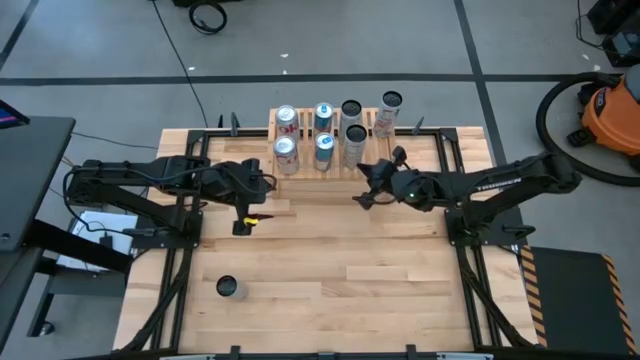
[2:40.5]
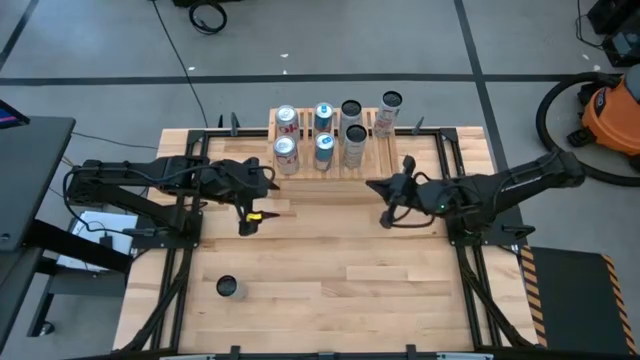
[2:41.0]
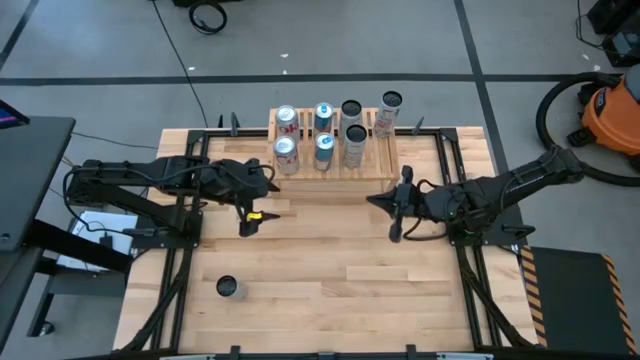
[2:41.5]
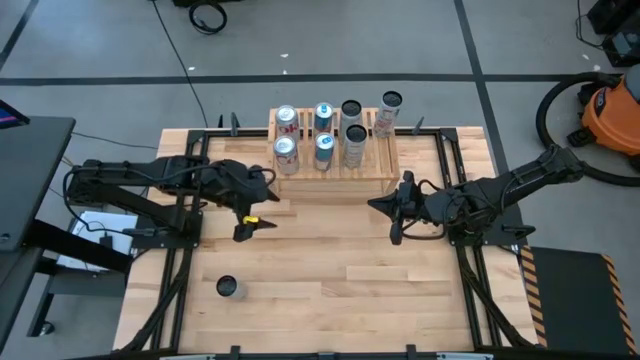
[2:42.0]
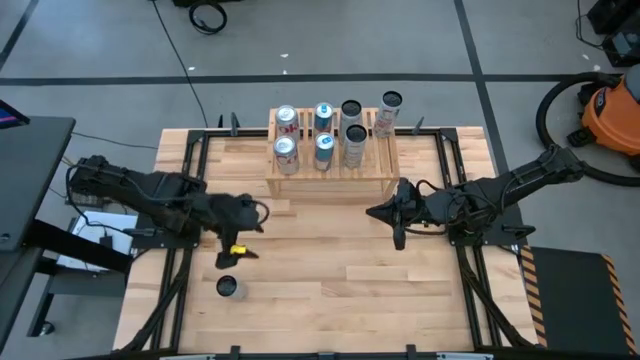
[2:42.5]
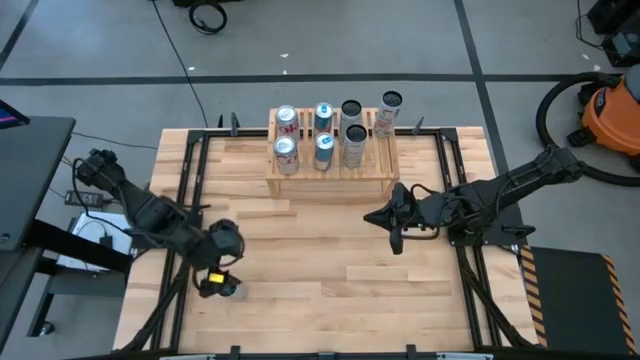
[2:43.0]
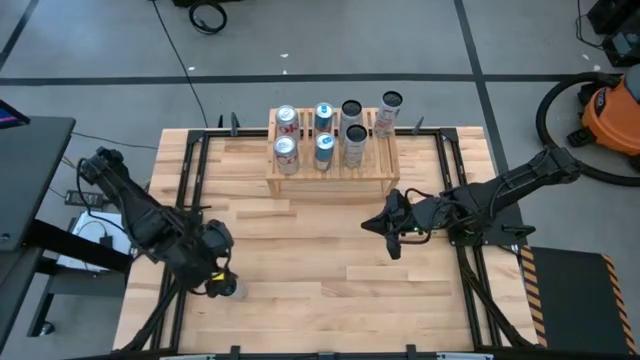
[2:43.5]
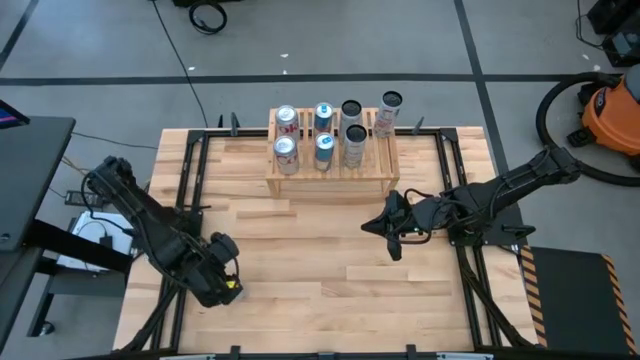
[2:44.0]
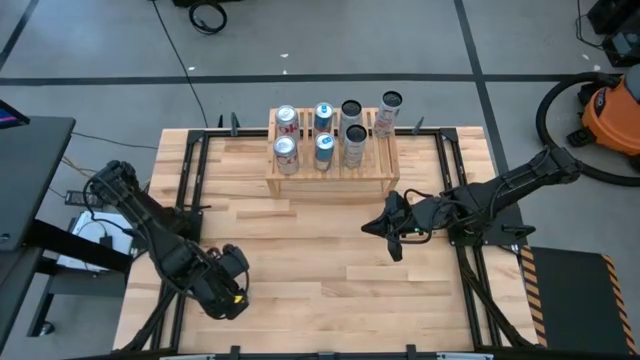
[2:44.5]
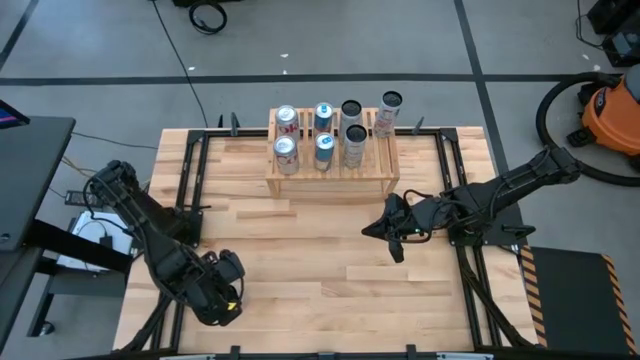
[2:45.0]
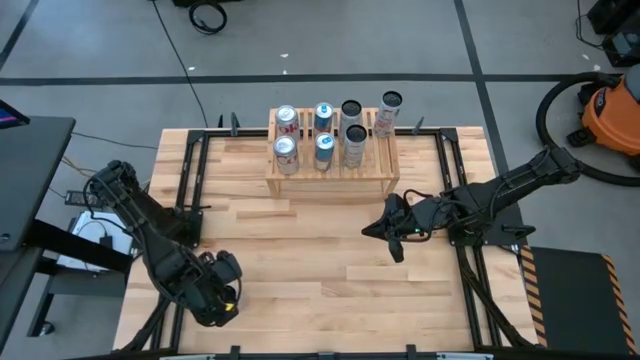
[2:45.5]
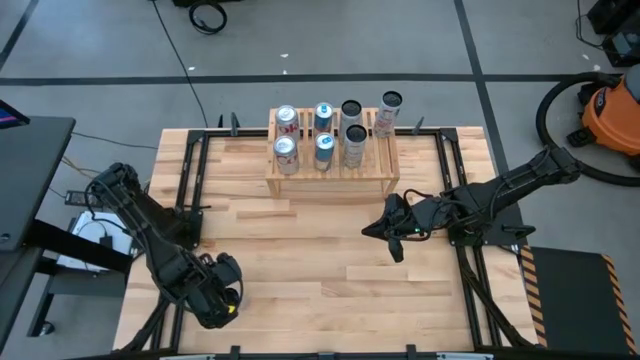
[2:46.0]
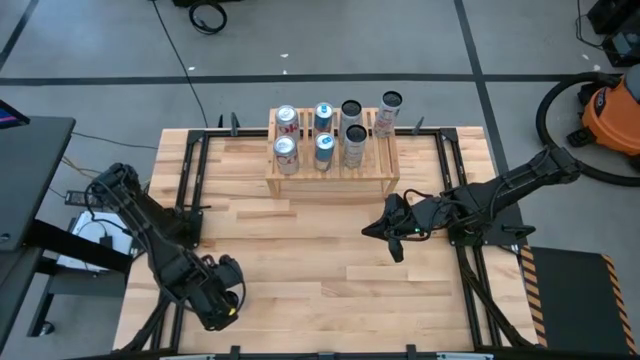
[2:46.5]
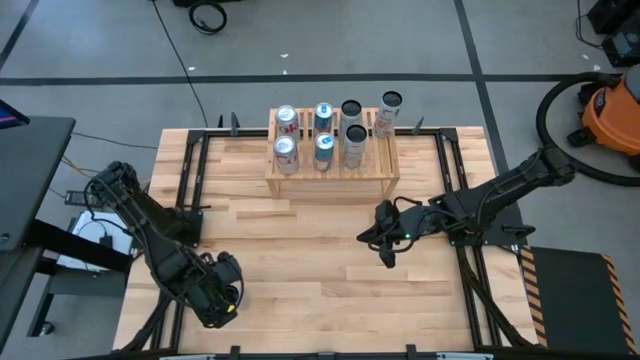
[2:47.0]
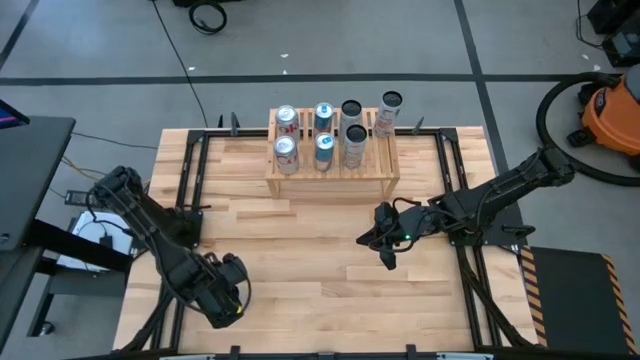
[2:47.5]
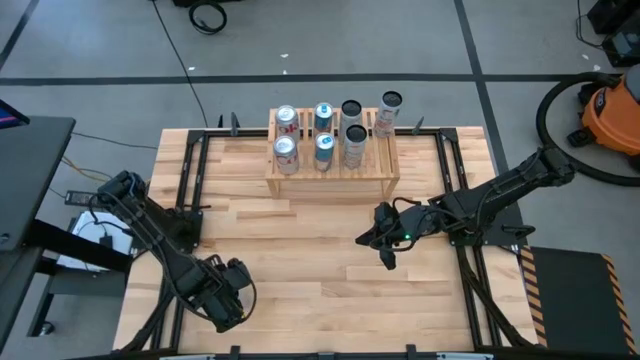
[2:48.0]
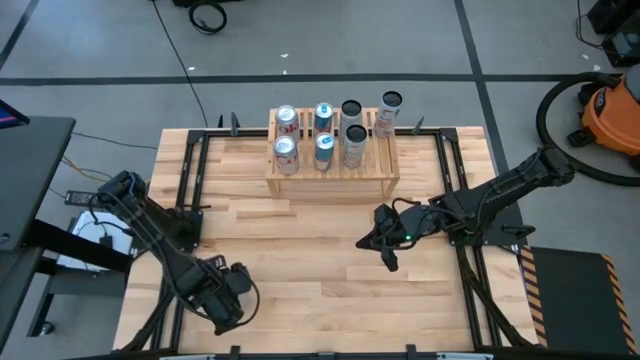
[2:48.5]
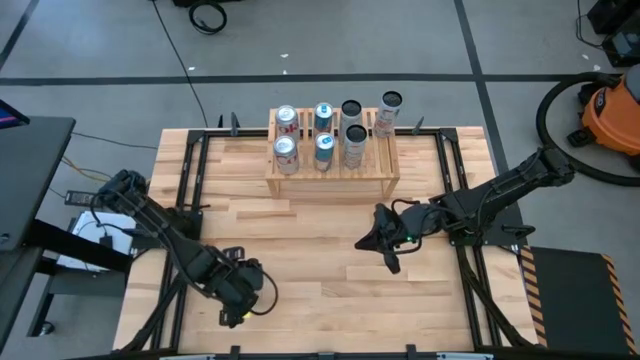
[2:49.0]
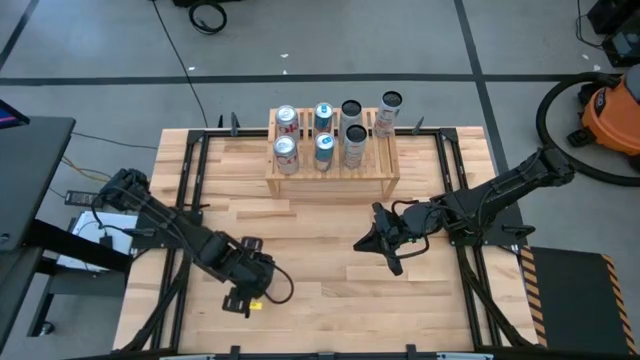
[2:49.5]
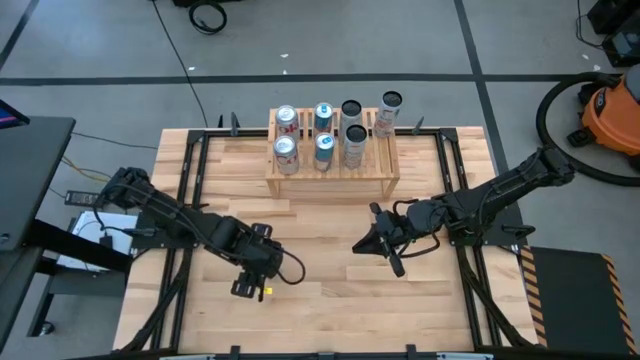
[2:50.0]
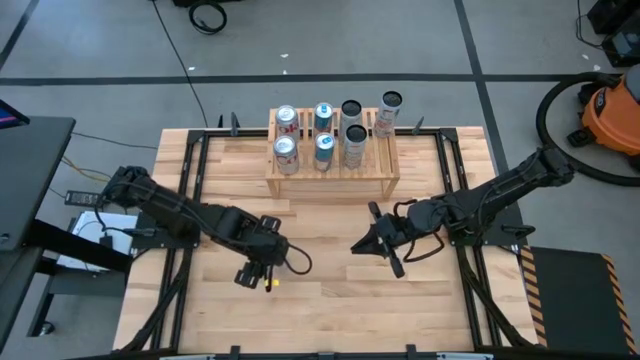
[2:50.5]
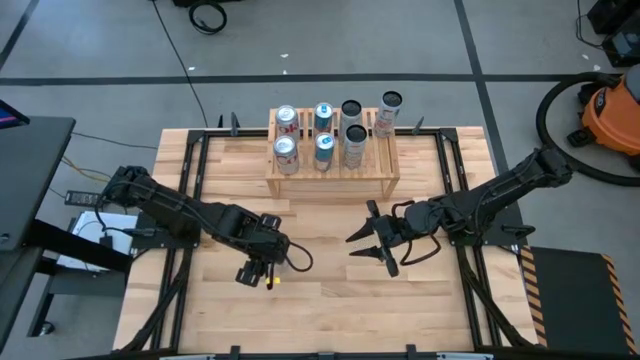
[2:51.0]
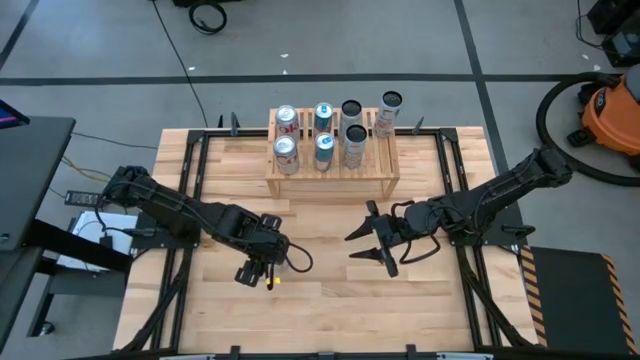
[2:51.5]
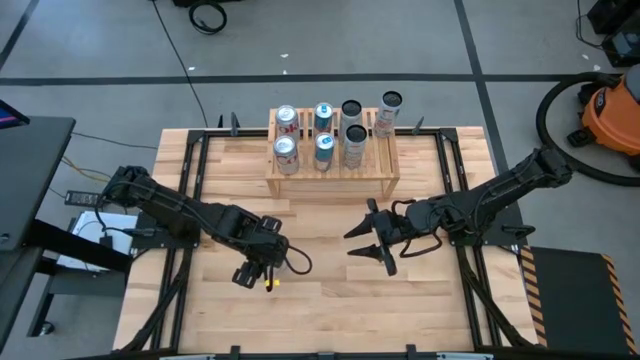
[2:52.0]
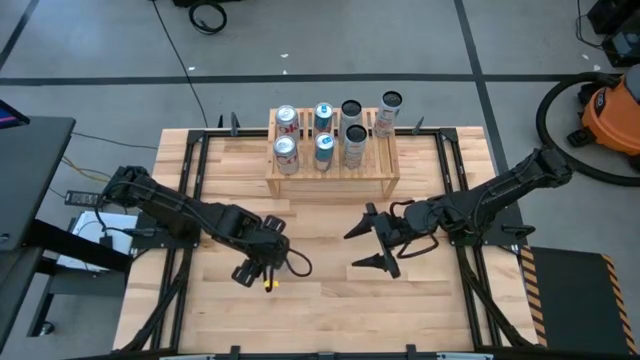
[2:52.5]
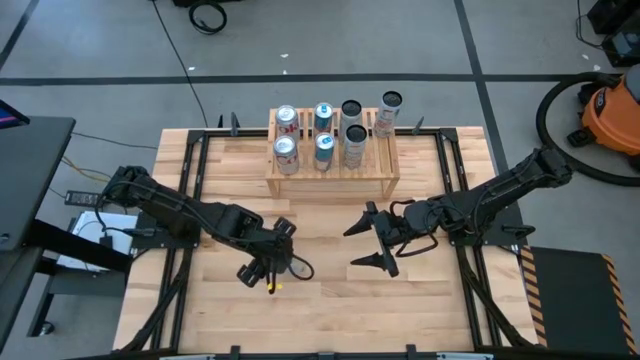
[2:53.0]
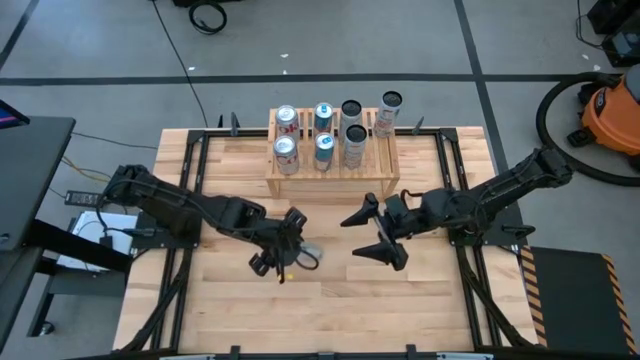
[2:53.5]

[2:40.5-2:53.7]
Task: Place canned beverage on shelf
Put the white-pink soda can aligned with the other white-pink soda can on the shelf

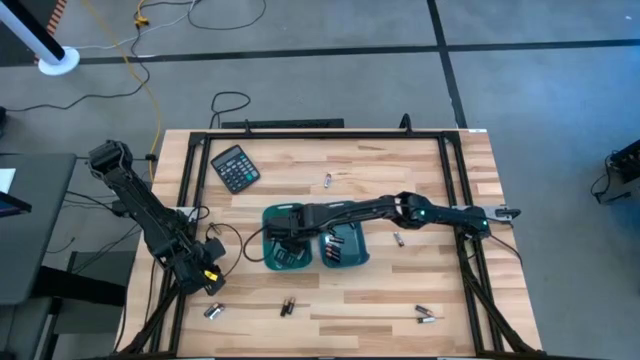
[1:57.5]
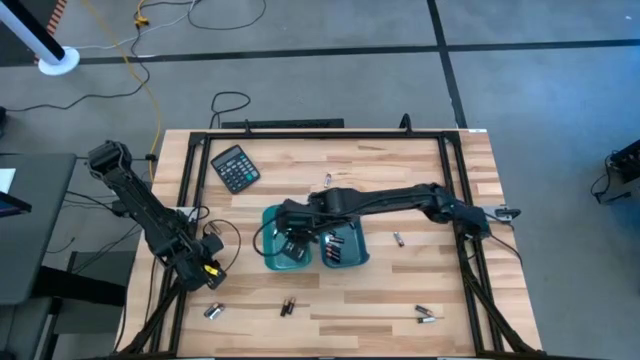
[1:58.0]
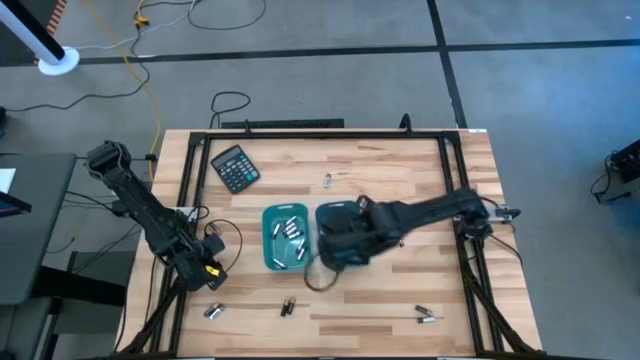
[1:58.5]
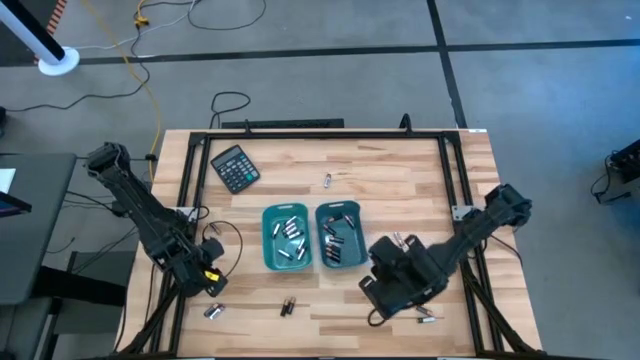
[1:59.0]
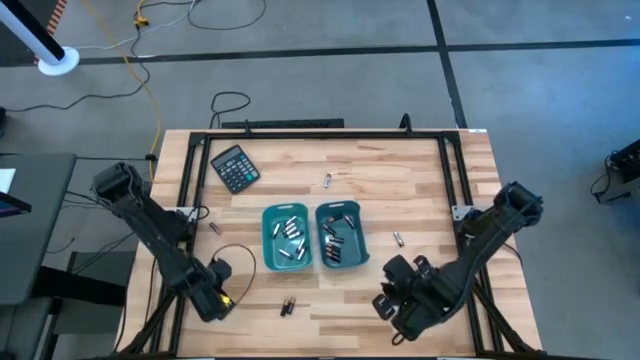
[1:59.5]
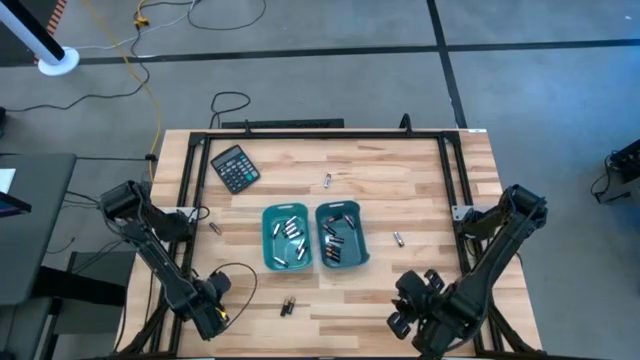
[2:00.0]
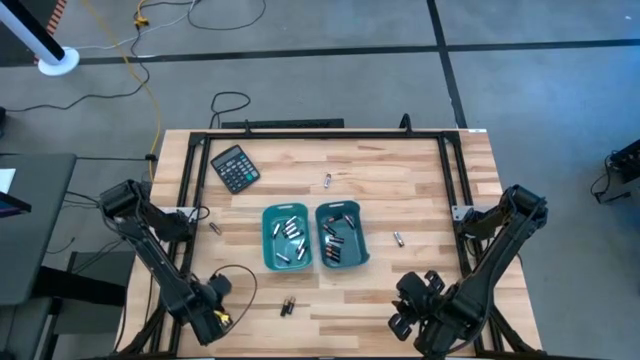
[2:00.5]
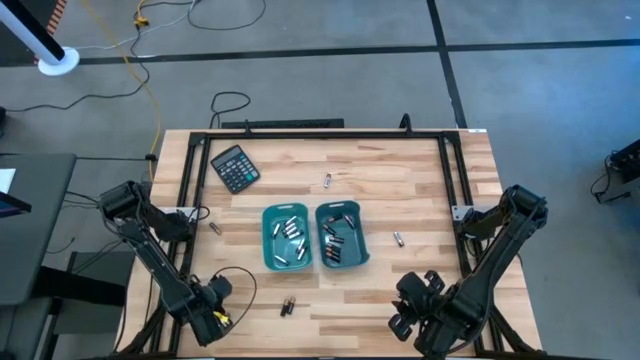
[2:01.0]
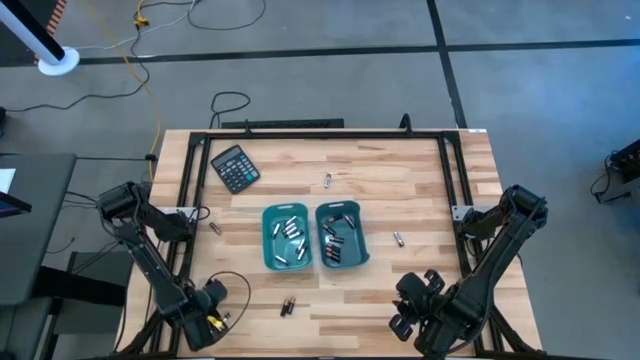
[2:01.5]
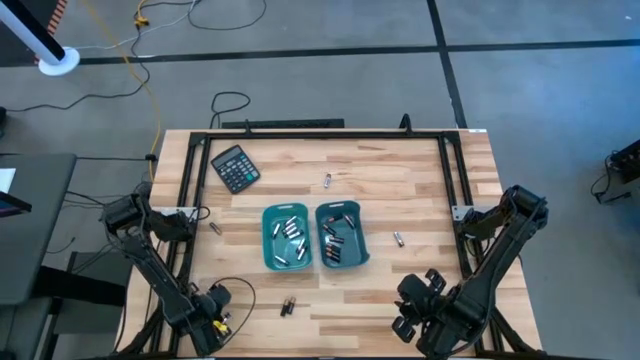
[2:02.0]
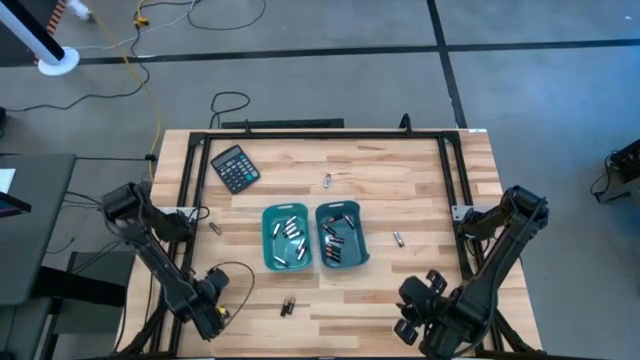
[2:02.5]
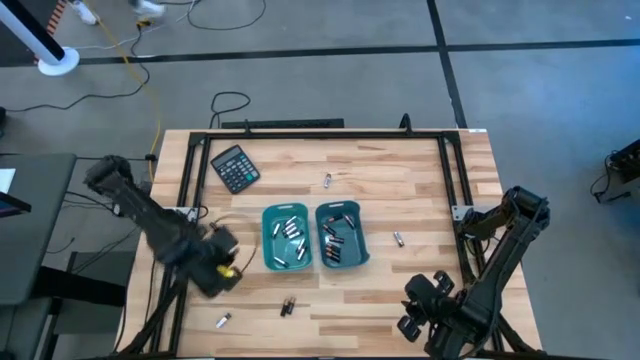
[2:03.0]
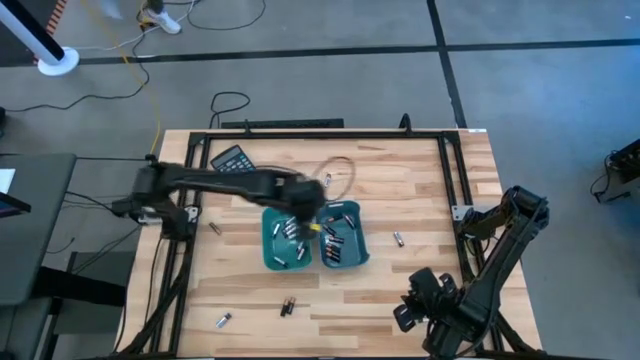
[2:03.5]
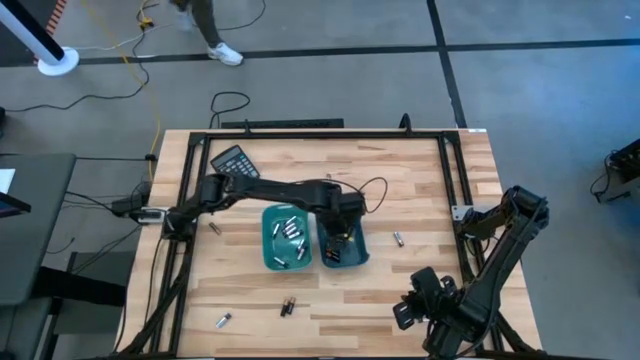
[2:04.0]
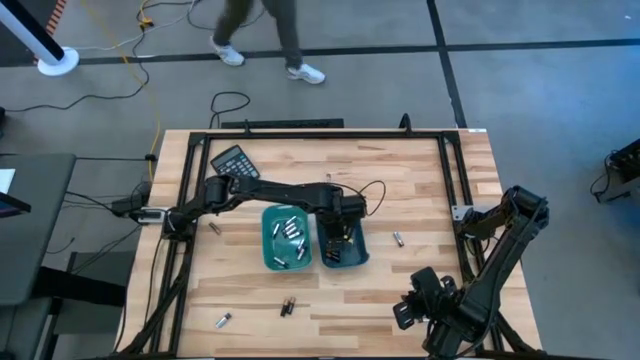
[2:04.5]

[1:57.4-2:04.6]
Task: Sort batteries
Put the black battery into the blue bin
